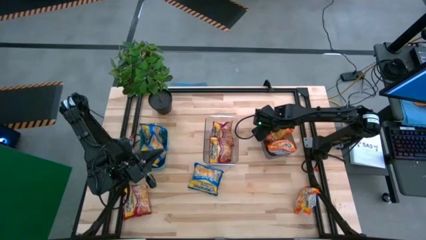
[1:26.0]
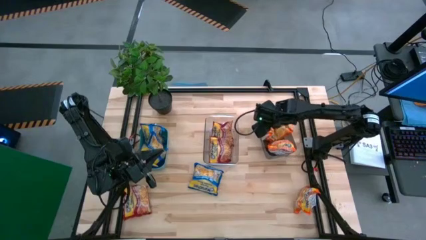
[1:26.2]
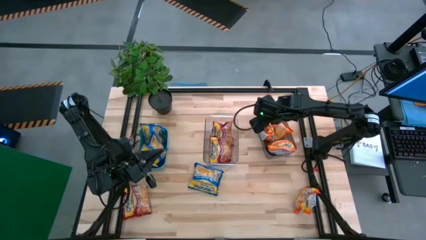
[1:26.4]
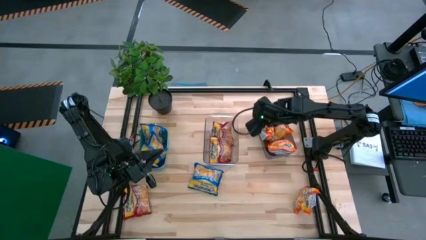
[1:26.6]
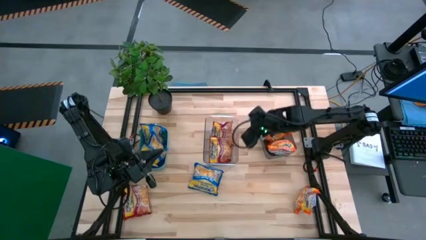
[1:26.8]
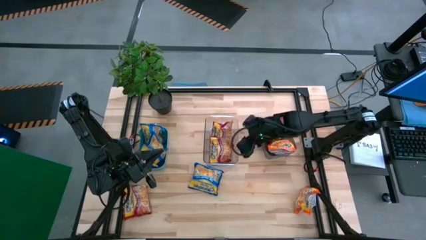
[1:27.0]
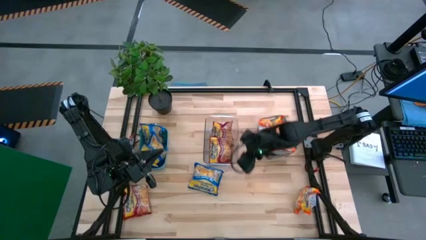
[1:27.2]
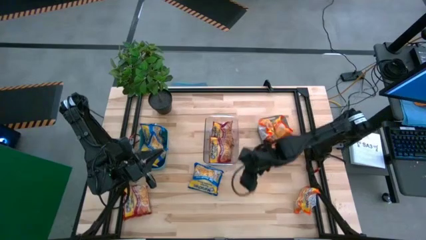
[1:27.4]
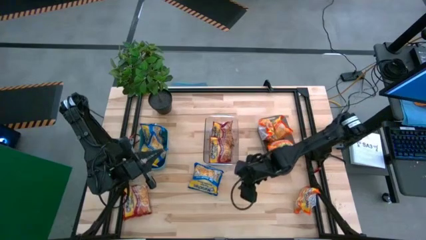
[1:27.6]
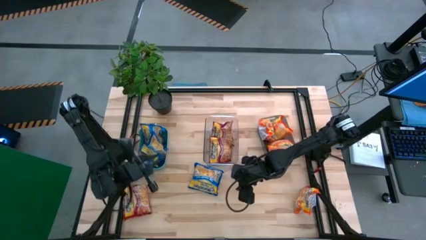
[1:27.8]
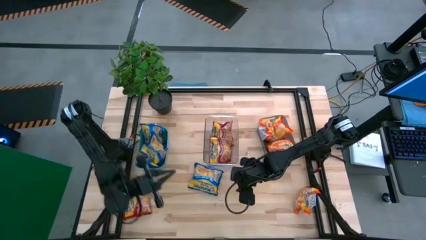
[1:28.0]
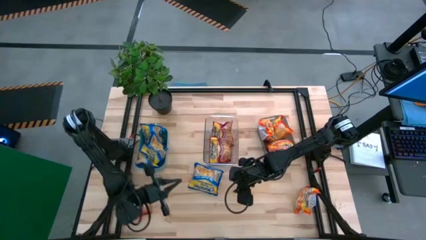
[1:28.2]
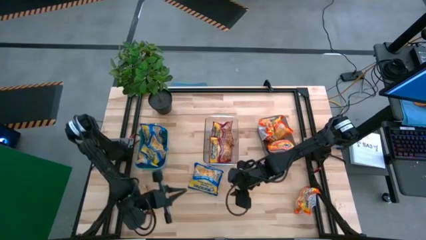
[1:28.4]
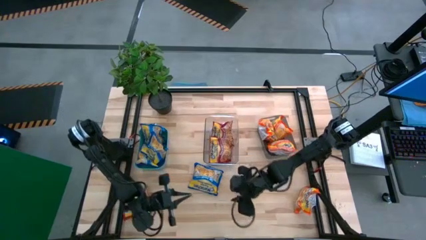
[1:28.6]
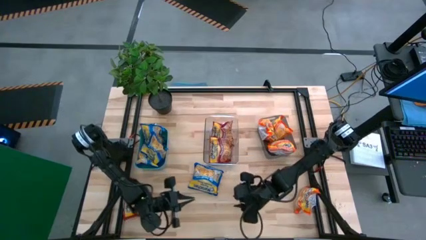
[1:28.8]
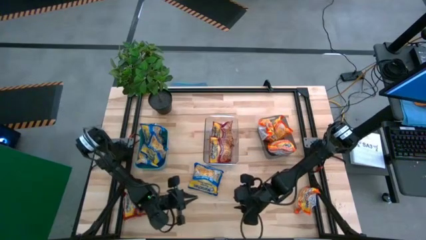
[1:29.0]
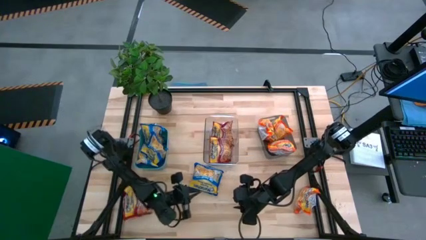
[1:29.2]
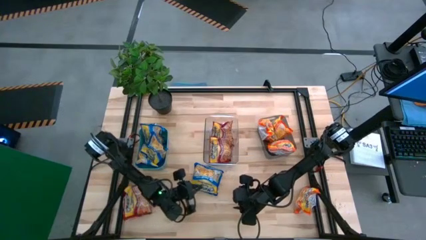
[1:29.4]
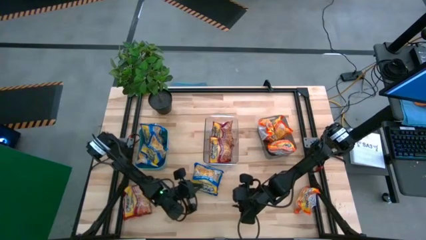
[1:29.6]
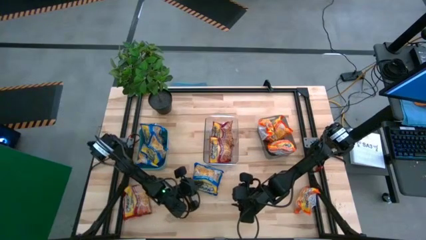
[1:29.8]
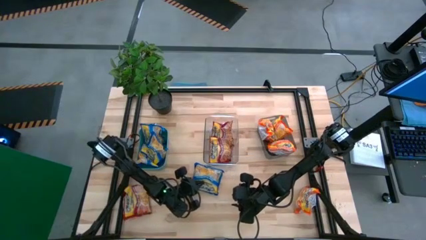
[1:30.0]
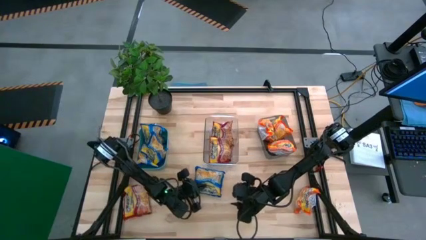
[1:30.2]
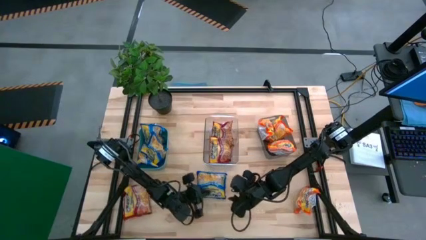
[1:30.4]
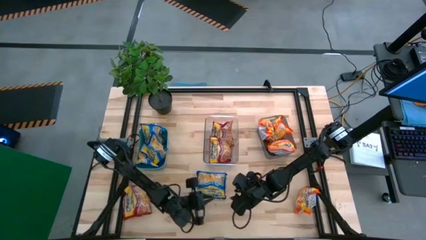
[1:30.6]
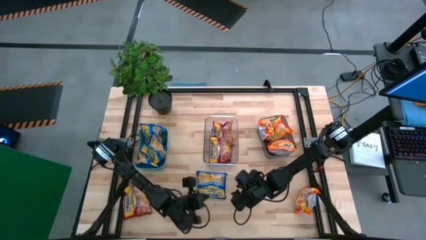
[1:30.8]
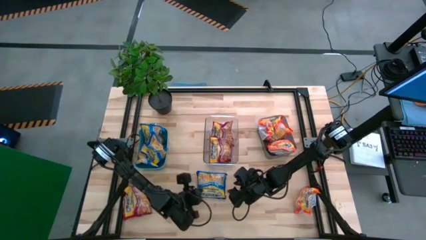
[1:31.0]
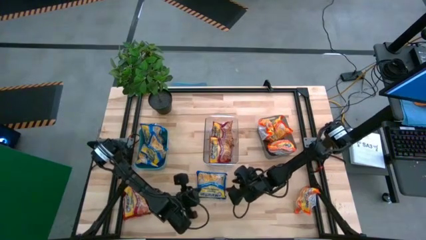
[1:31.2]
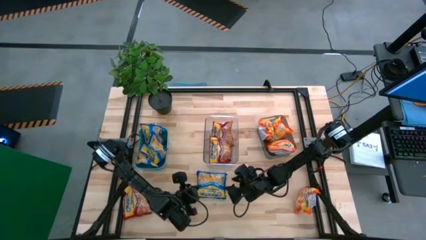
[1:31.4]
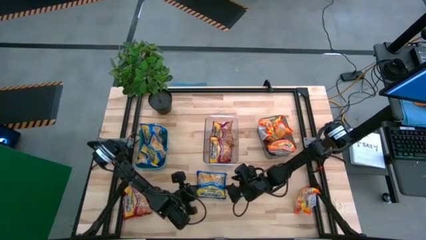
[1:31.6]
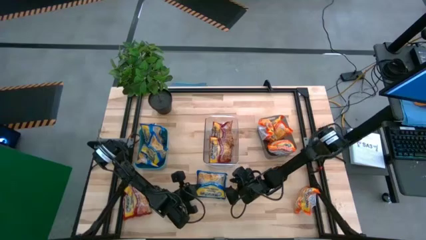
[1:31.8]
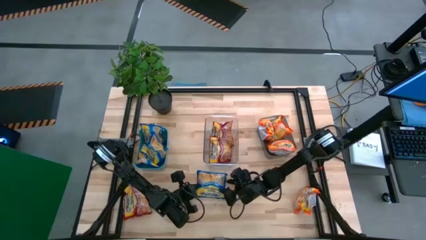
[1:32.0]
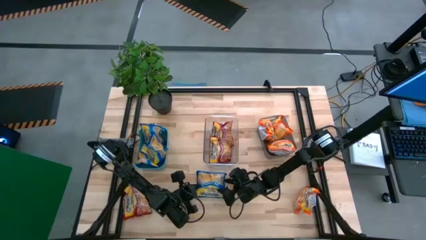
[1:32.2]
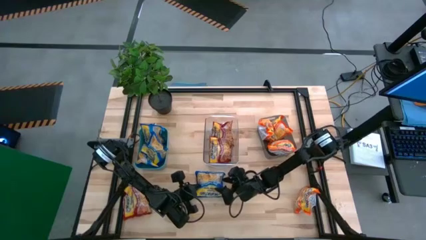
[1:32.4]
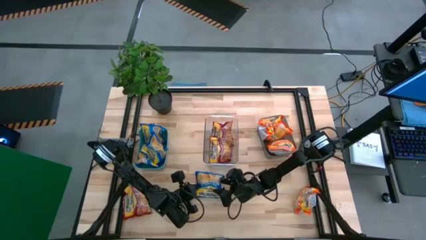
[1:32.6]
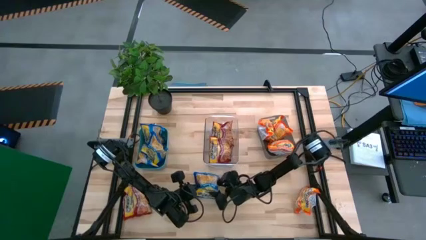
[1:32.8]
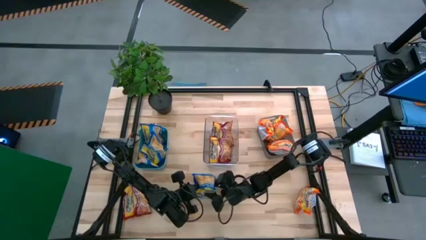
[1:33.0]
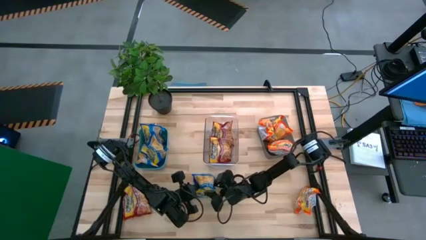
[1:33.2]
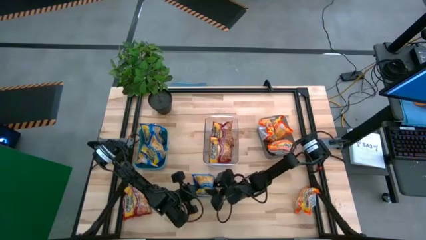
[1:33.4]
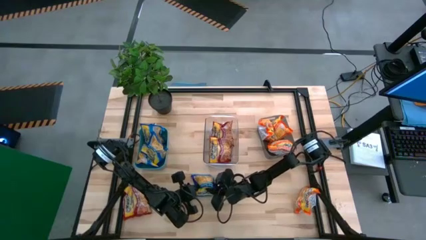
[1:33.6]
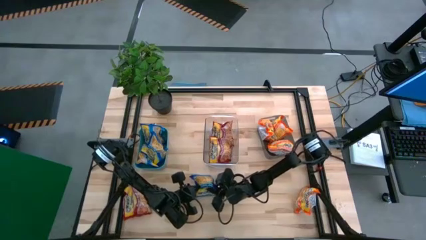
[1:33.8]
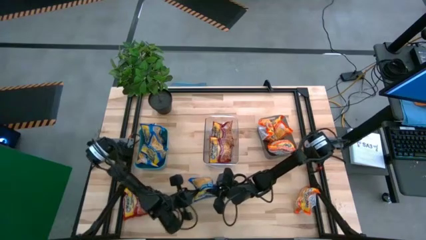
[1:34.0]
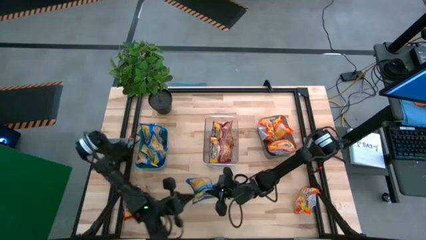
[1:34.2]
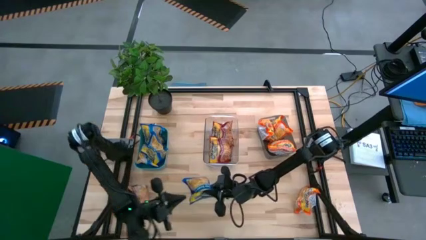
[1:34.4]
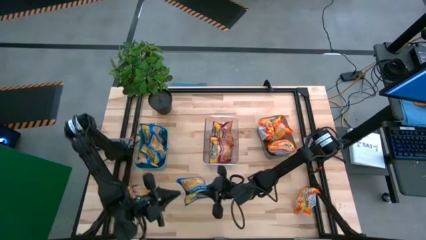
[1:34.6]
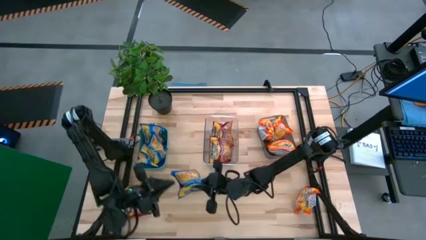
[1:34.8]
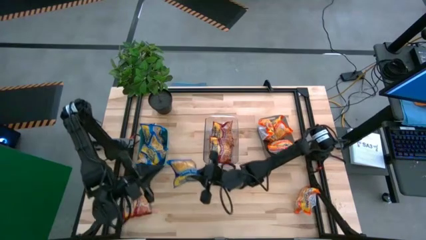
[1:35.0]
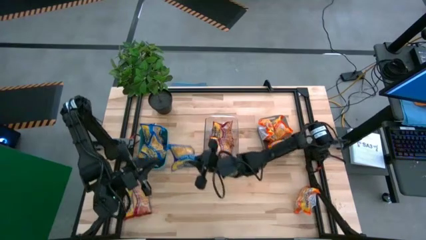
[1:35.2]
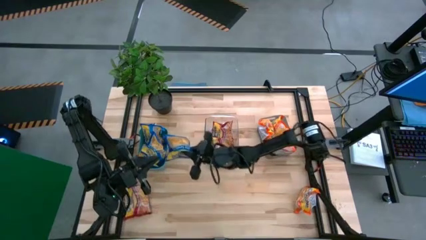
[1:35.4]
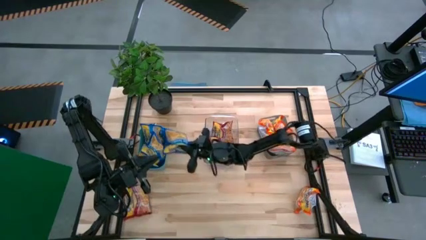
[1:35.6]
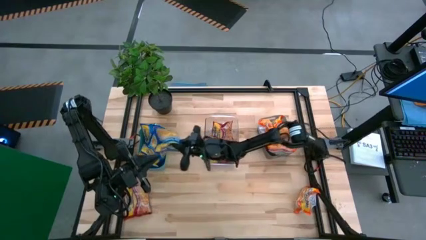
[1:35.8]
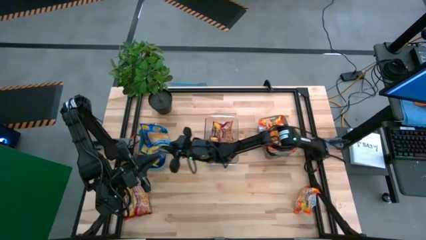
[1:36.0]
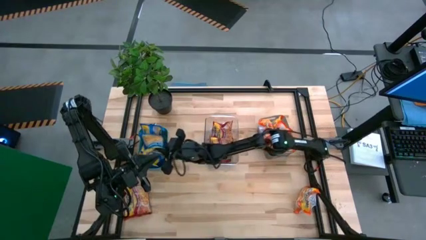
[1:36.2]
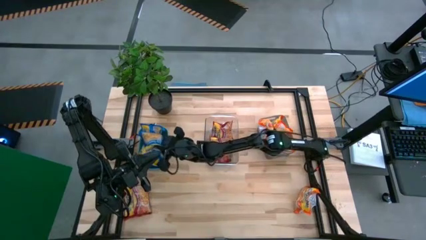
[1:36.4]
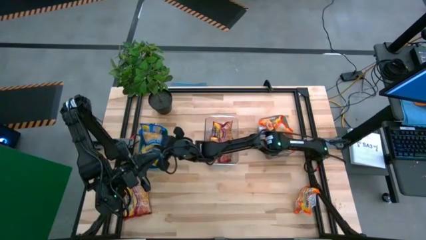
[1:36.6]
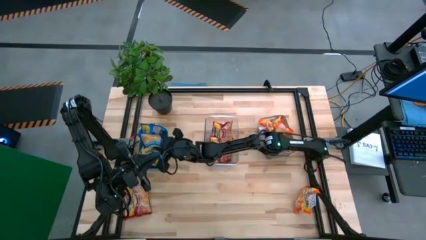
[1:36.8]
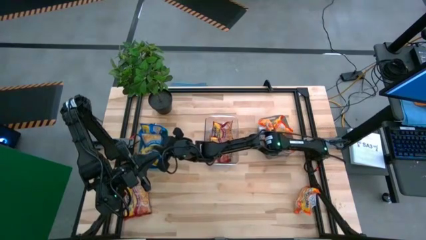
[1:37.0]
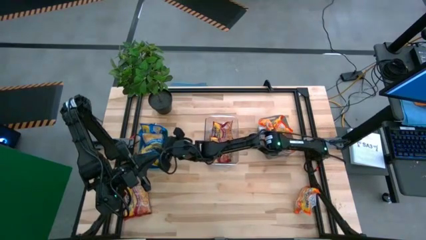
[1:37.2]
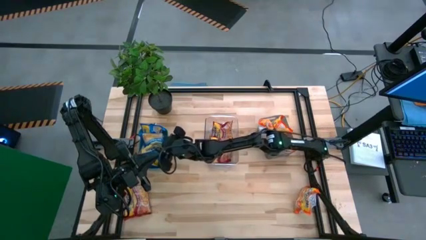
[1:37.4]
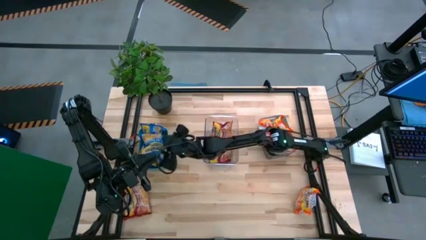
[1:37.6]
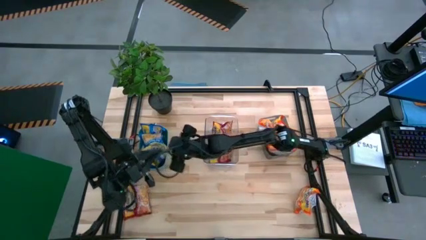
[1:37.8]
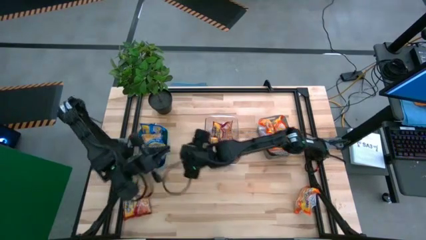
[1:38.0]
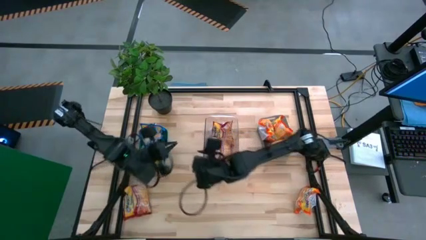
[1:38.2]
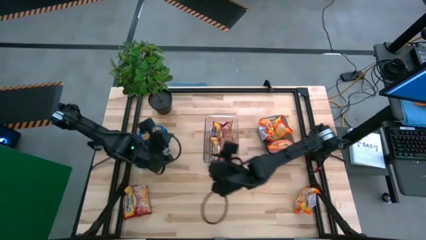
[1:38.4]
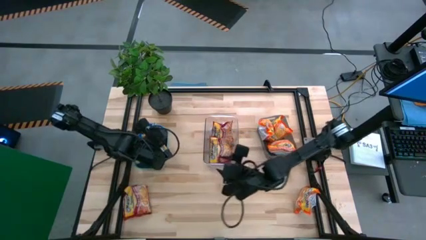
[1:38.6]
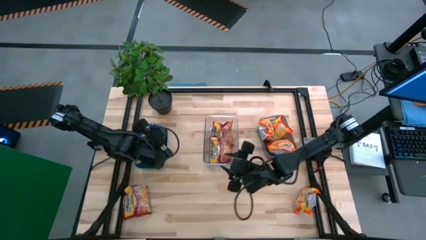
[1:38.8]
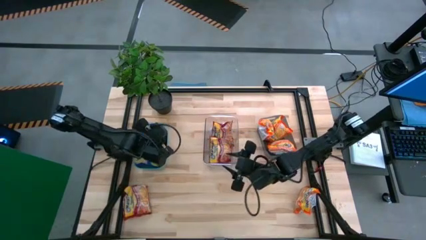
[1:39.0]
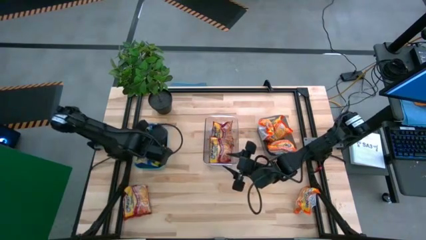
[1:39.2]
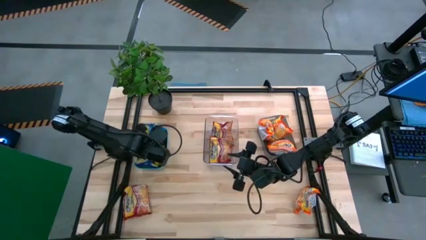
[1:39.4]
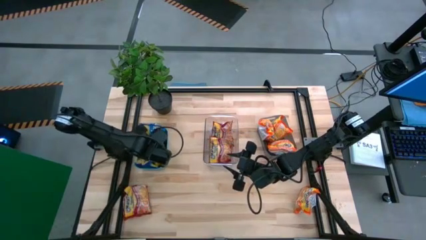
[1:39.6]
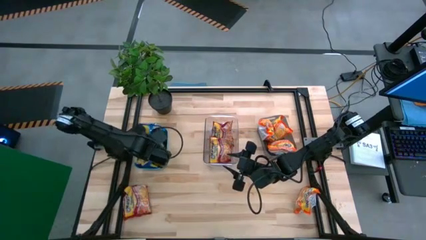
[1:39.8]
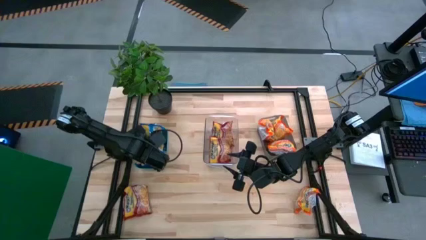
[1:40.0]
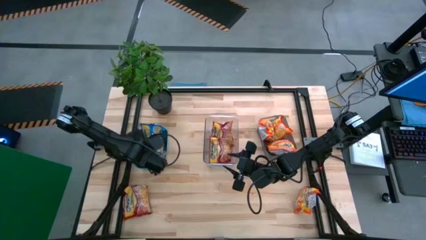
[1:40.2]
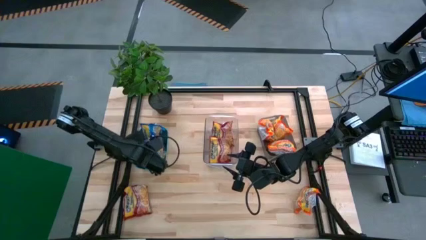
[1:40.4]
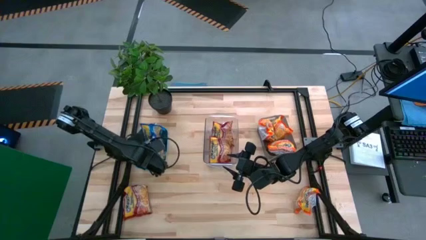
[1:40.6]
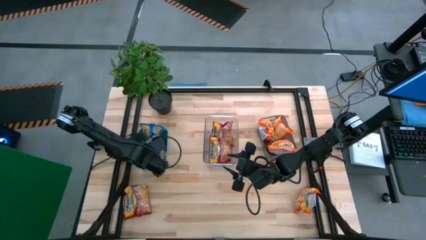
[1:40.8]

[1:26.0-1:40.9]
Task: Sort Maruchan noodles
Put the blue noodle pack into the green bin
